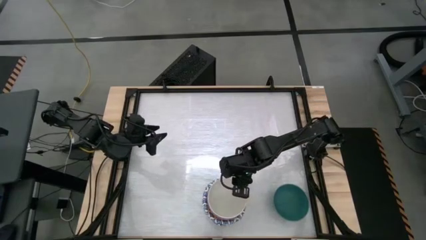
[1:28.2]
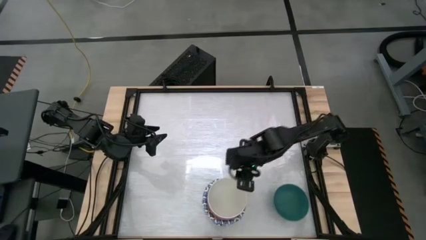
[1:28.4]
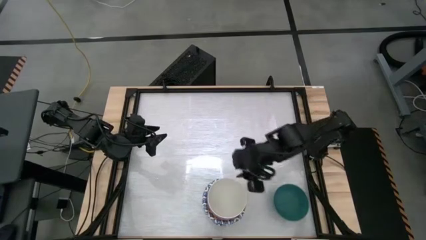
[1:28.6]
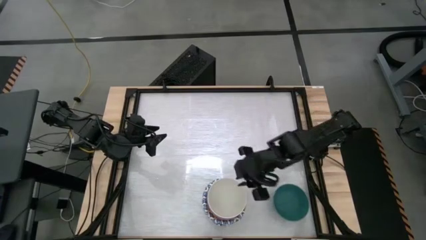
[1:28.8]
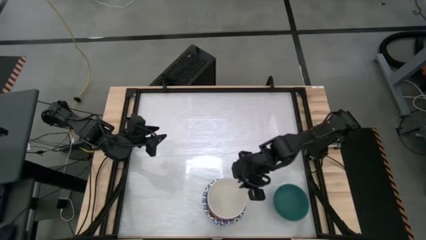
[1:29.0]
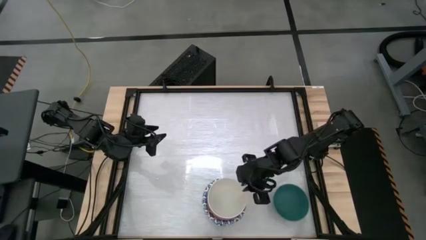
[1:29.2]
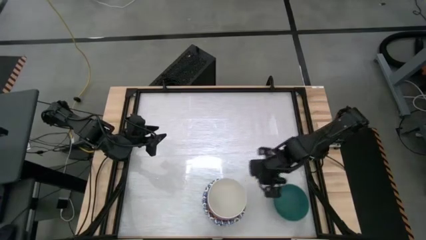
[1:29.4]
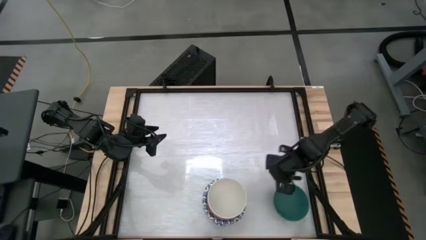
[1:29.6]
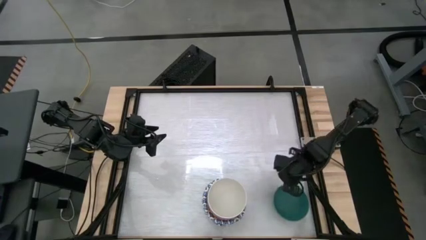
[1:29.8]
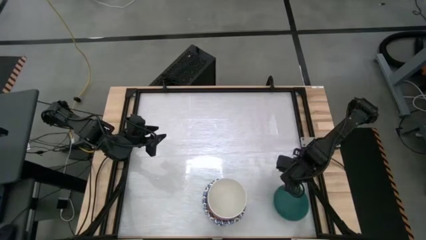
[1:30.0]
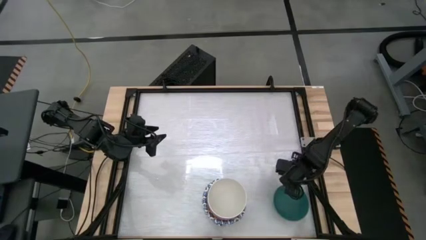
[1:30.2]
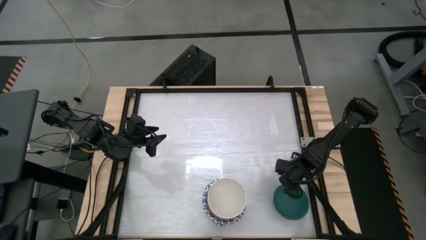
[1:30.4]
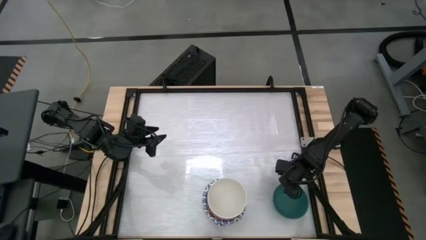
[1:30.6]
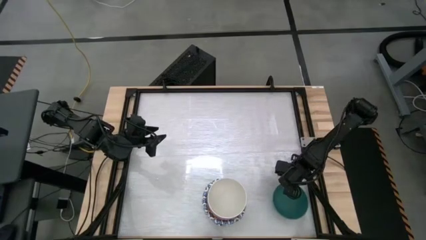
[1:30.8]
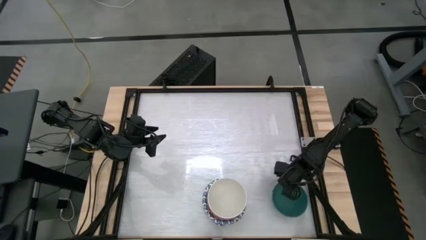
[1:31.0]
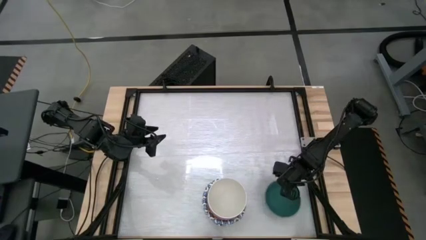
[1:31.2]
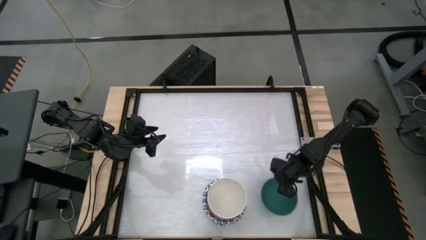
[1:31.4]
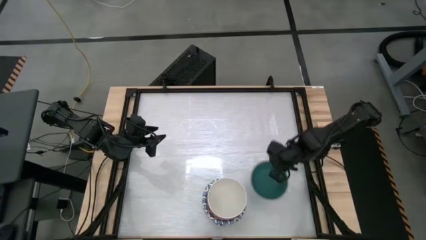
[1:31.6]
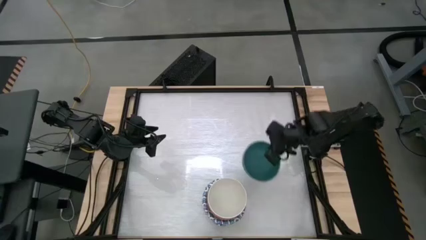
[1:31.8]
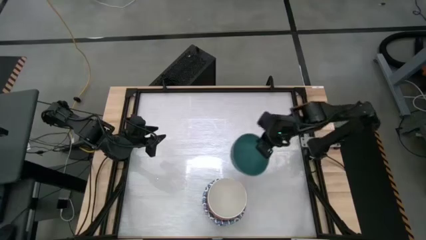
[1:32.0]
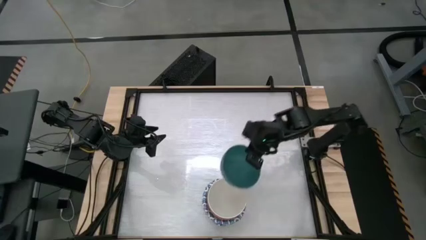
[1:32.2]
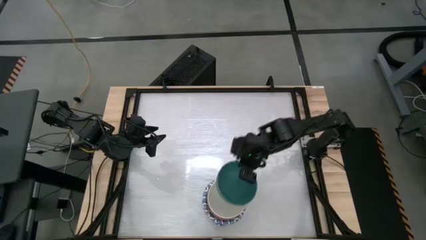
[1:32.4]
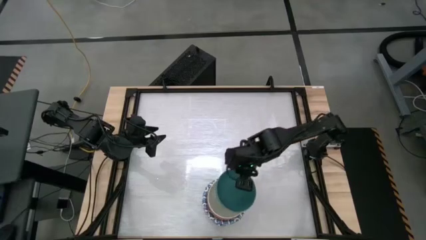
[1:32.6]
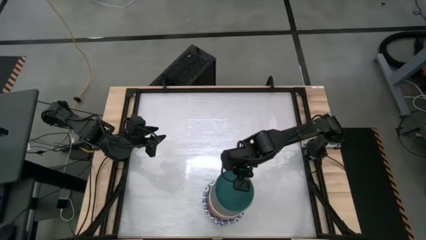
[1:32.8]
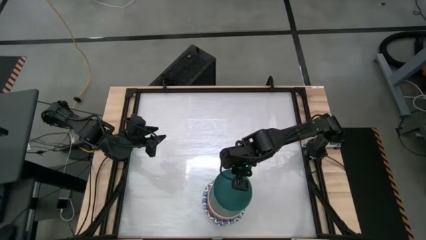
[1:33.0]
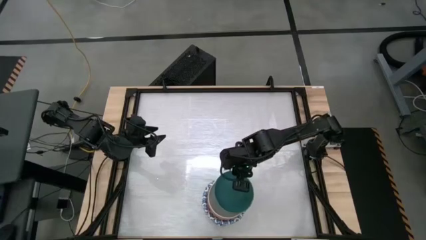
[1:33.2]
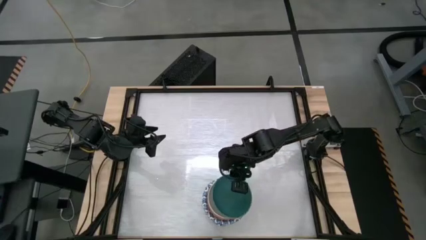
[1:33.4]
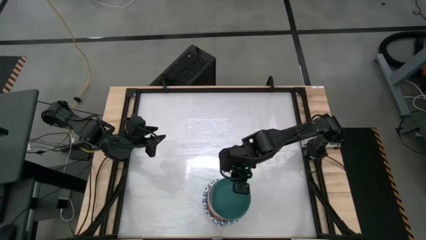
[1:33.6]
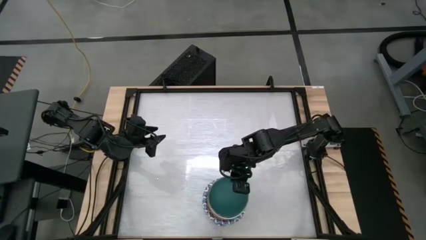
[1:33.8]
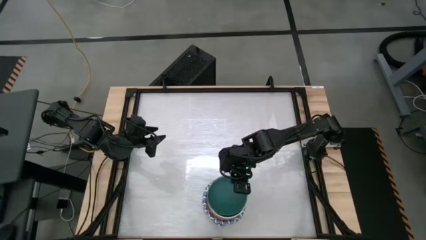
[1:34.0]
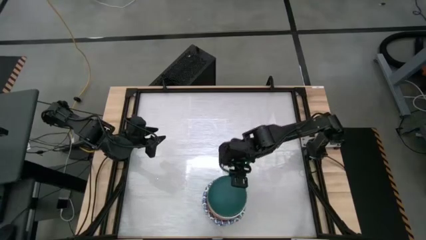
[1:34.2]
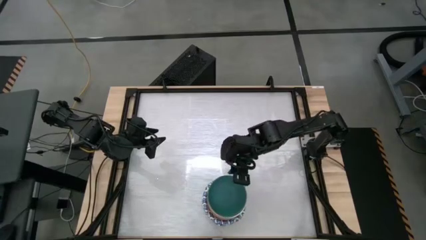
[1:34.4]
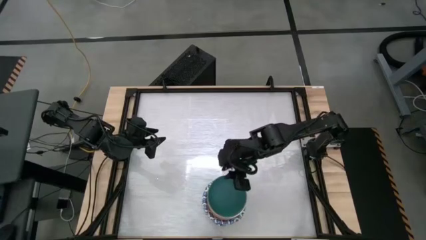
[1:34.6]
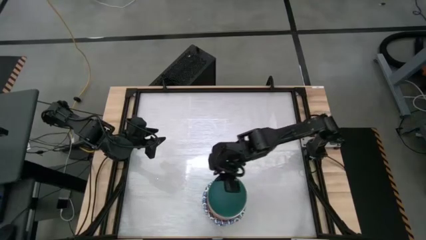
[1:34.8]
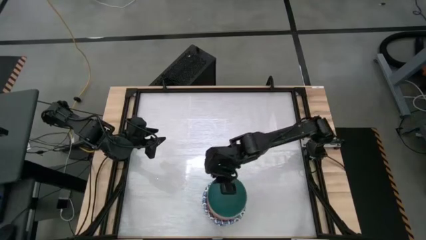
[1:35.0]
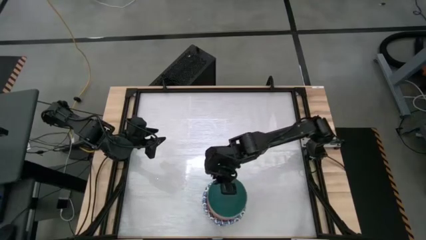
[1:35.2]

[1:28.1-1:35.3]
Task: Nest bowls inside each other by size order
Stack the green bowl on top of the white bowl

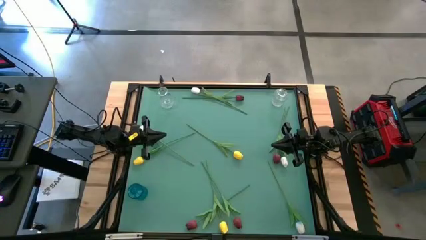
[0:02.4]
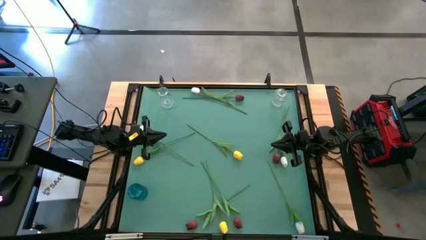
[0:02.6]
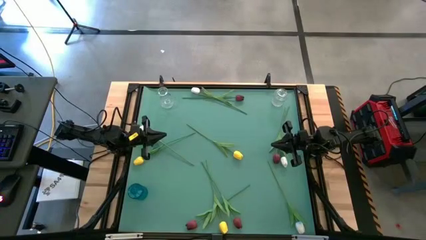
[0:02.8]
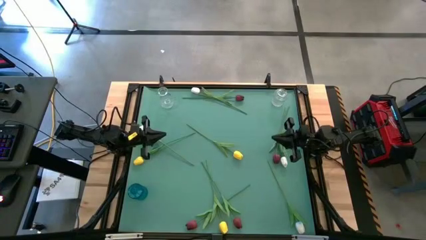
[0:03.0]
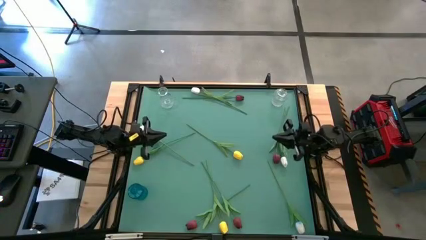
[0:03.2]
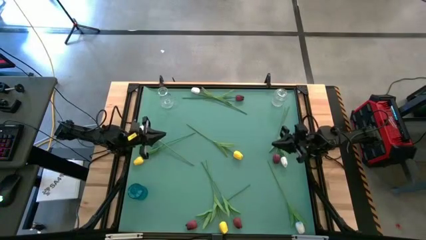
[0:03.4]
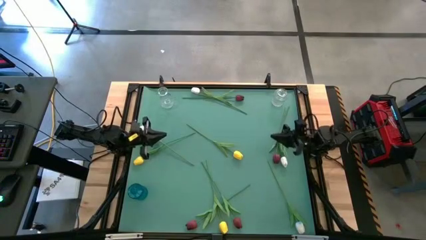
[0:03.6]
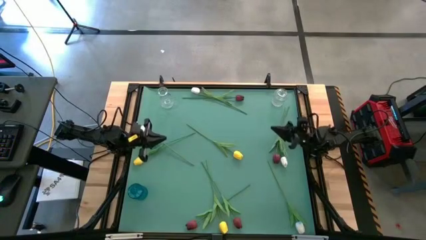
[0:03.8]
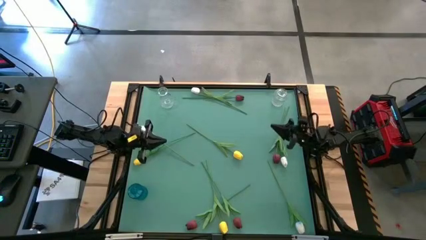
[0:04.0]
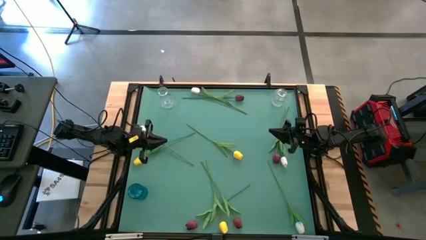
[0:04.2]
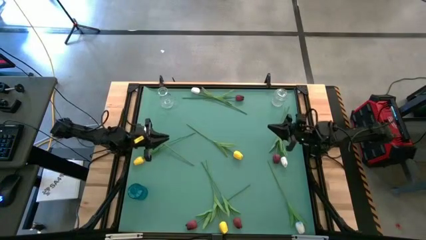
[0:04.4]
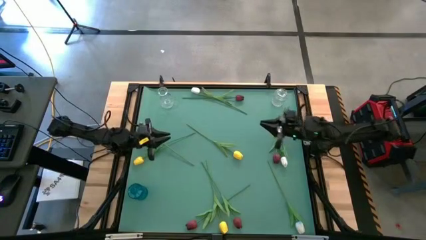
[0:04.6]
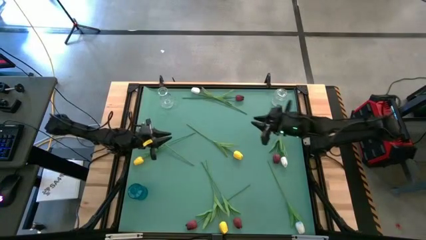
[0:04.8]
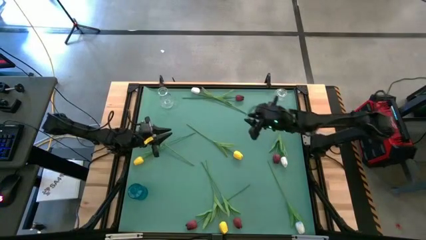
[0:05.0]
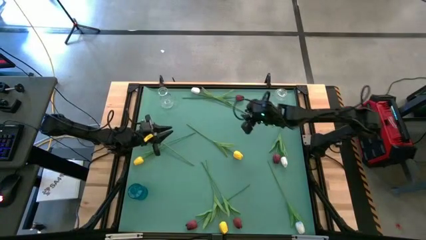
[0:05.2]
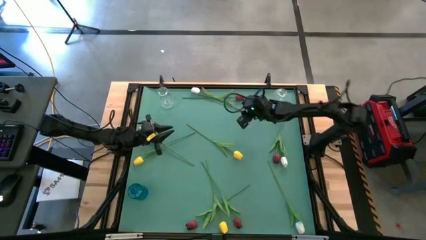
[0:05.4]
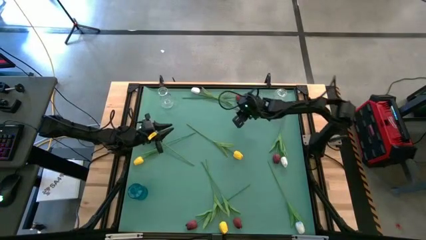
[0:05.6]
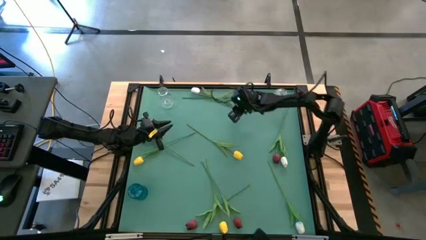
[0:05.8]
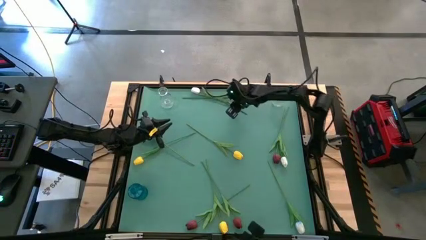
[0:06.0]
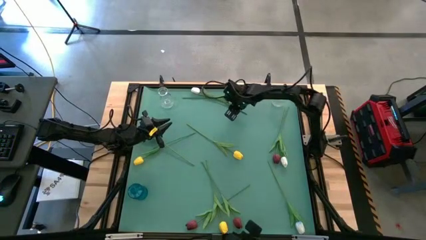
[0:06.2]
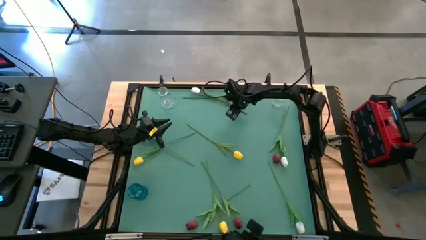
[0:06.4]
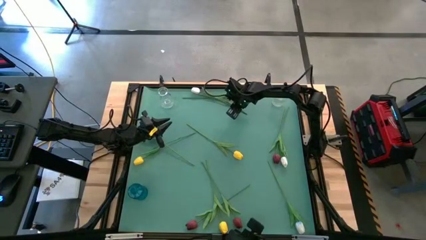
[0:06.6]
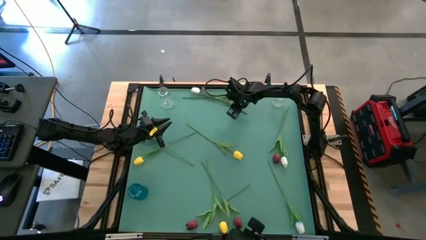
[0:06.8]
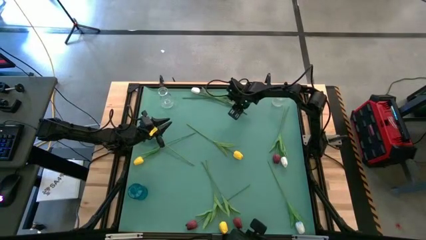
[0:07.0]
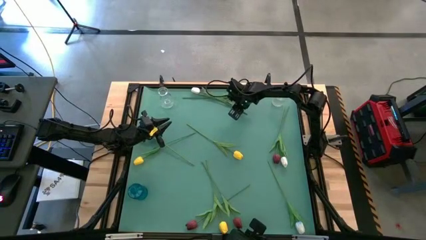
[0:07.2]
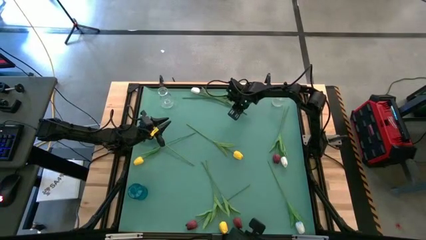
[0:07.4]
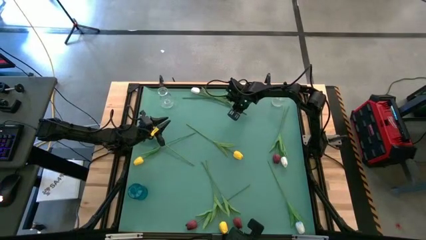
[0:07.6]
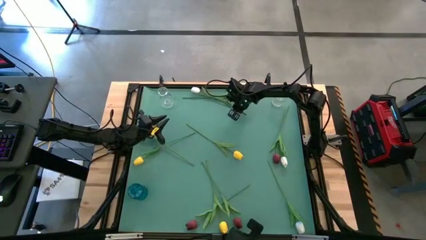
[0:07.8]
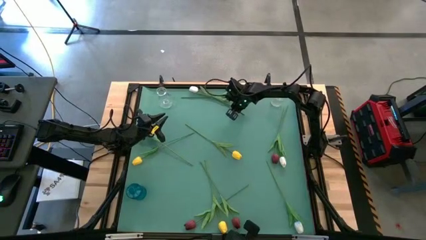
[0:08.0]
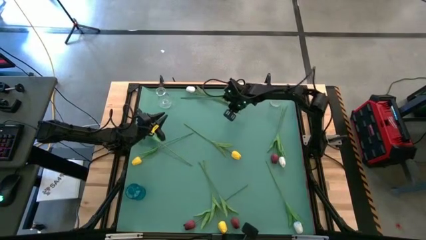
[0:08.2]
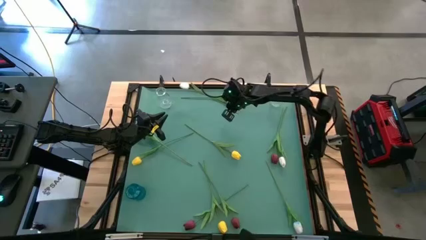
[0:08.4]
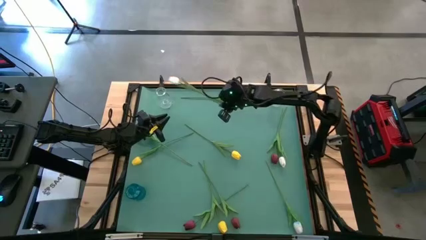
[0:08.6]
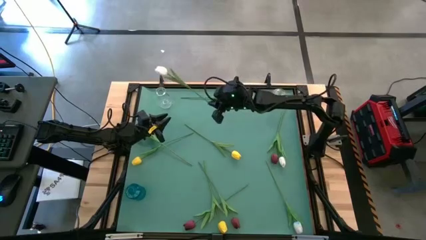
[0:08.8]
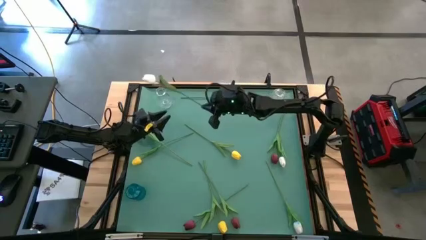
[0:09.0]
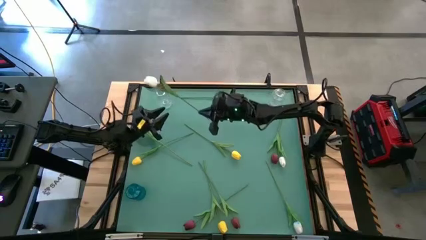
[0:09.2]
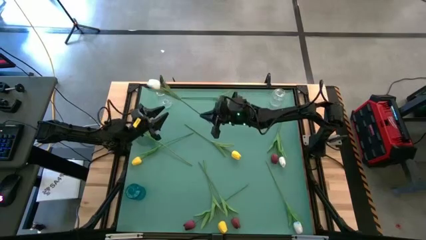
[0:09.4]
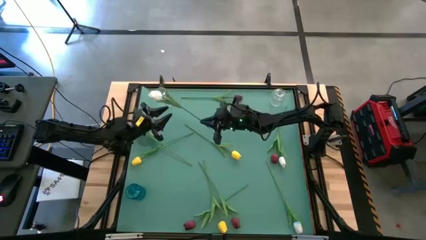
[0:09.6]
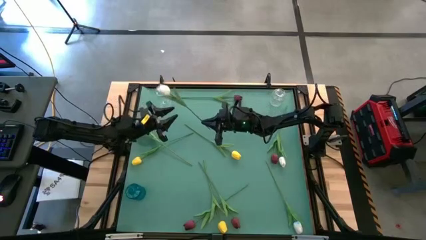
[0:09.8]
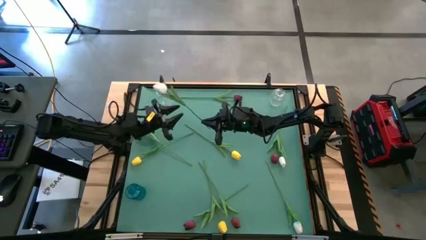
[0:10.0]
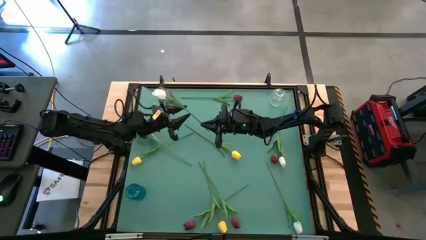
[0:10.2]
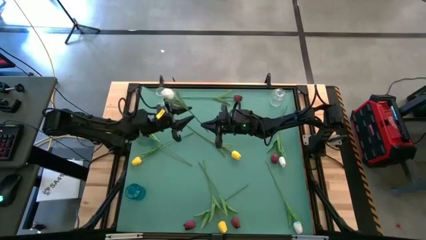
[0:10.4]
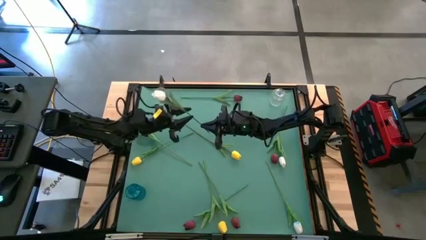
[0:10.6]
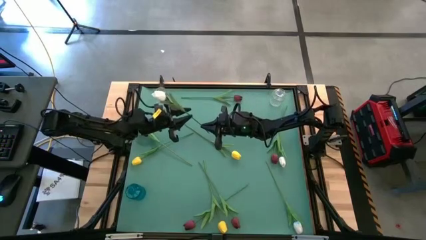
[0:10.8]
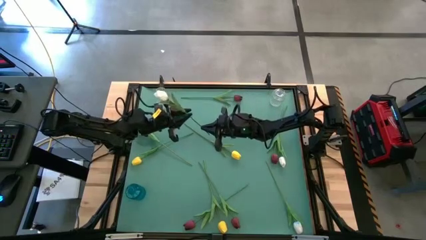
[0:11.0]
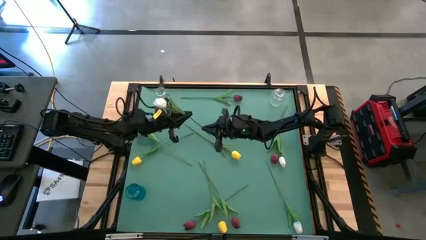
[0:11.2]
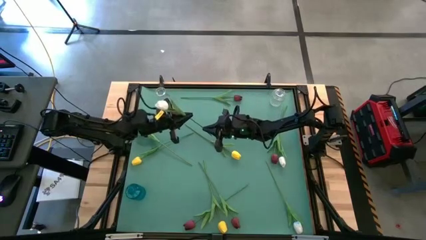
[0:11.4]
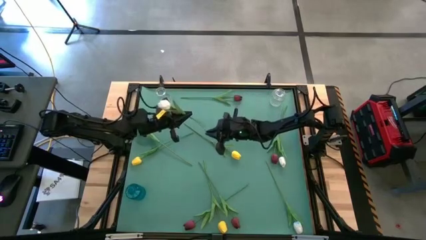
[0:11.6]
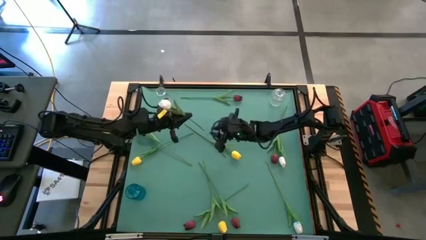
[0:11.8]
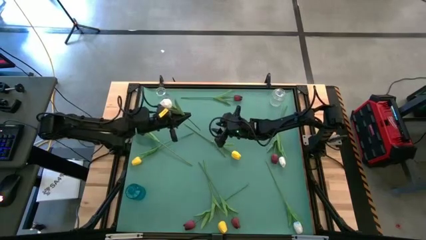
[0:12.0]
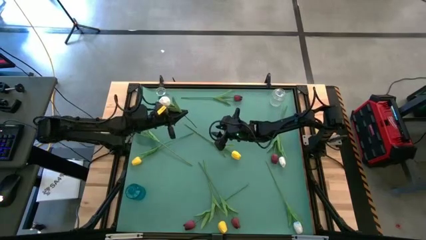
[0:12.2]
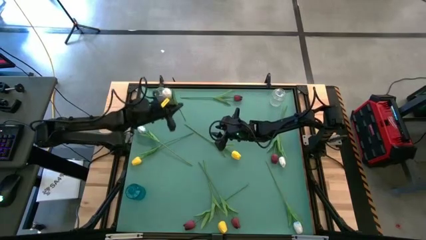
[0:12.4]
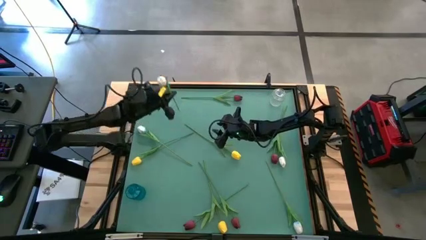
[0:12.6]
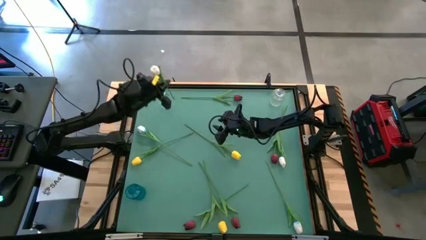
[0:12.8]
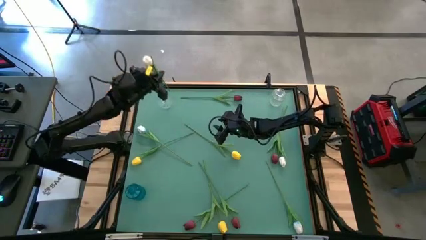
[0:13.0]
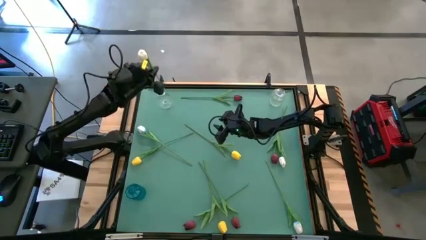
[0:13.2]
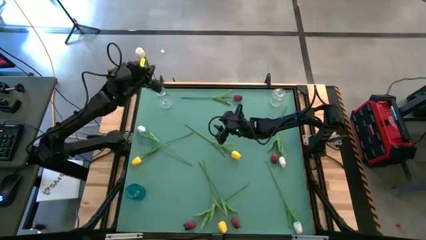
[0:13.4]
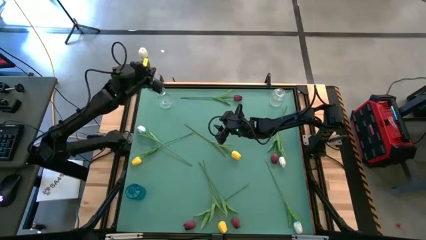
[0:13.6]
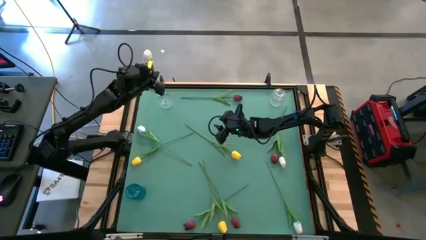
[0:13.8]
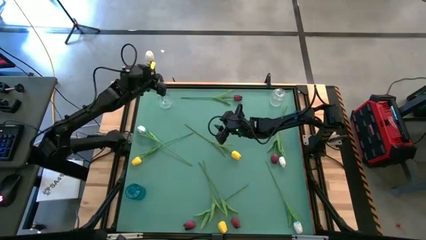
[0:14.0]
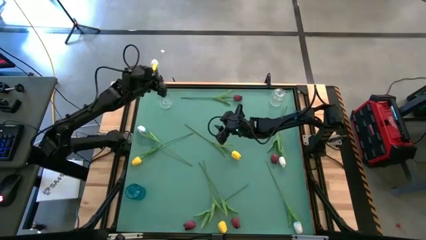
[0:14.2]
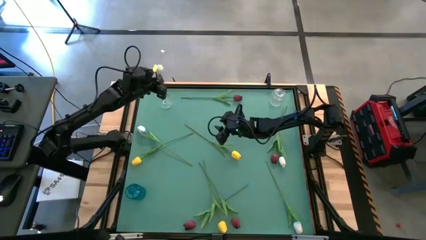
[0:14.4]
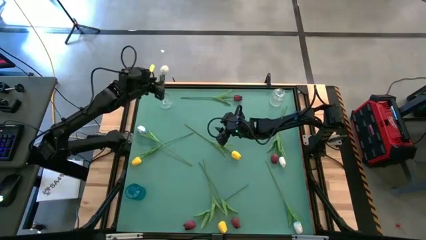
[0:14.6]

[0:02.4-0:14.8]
Task: Sort flowers into vase by color
Put the white flower into the left transparent vase
